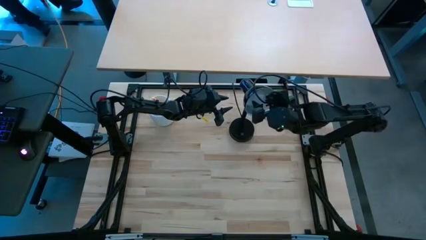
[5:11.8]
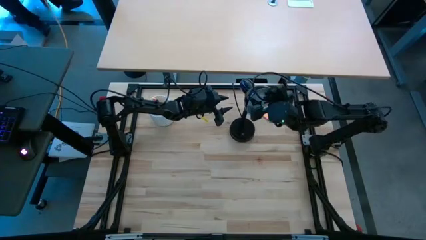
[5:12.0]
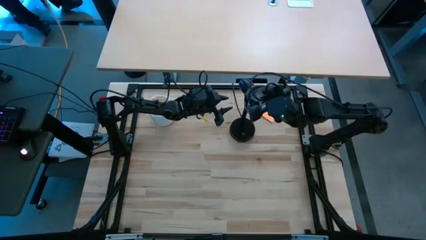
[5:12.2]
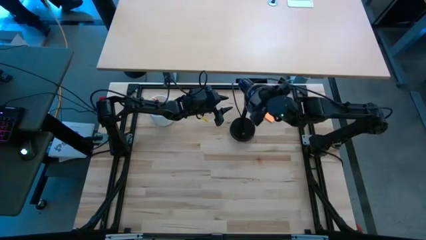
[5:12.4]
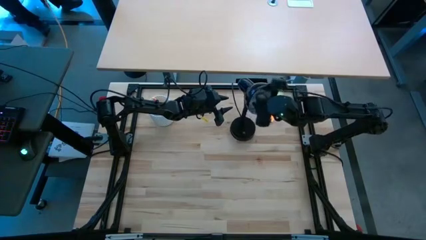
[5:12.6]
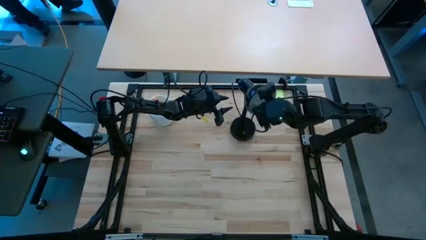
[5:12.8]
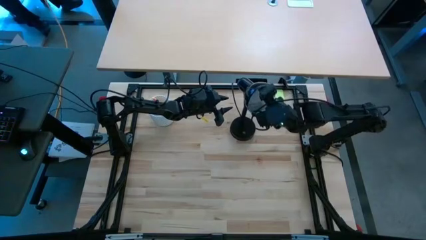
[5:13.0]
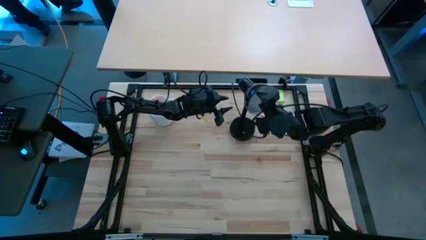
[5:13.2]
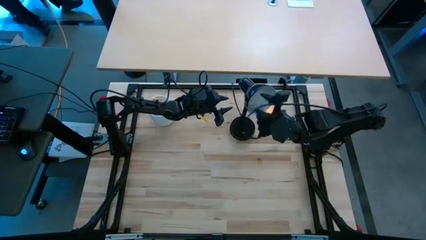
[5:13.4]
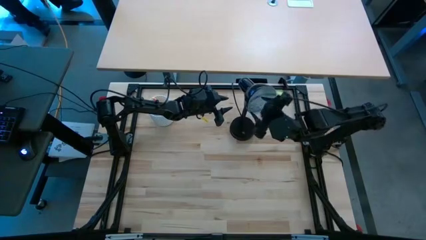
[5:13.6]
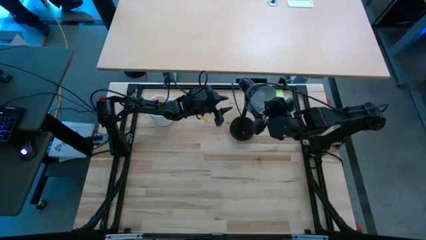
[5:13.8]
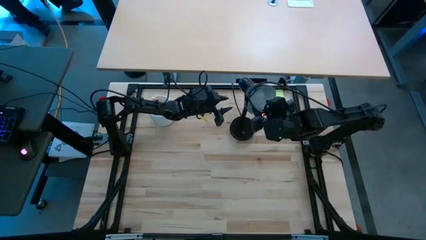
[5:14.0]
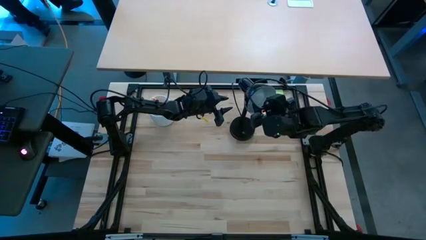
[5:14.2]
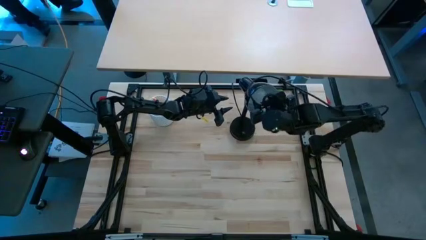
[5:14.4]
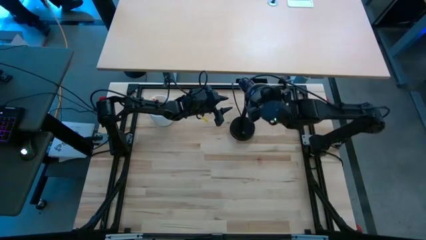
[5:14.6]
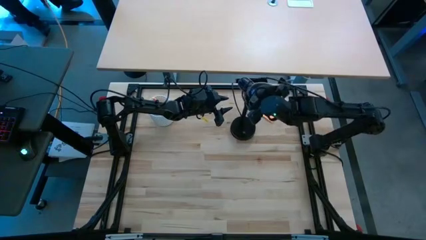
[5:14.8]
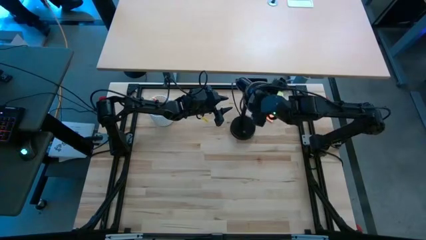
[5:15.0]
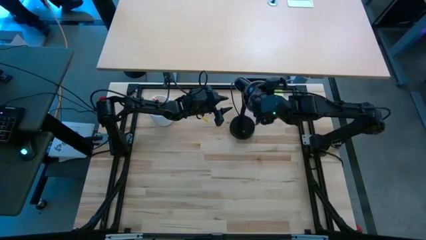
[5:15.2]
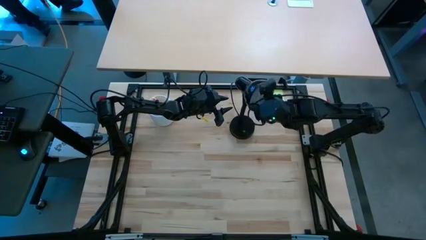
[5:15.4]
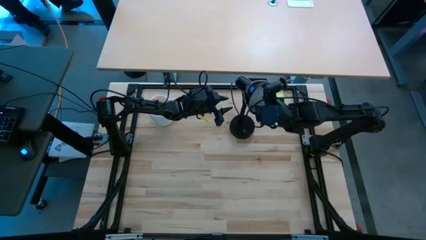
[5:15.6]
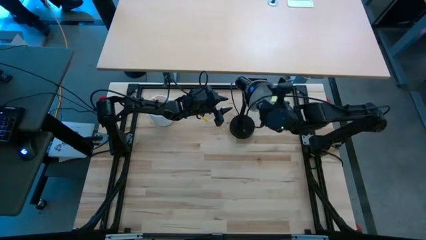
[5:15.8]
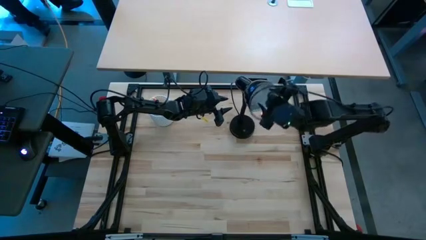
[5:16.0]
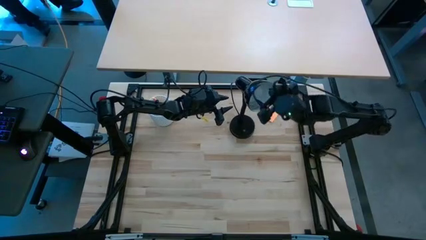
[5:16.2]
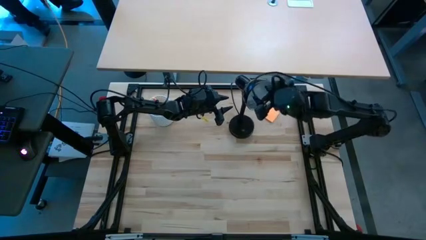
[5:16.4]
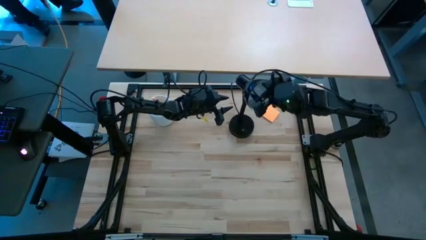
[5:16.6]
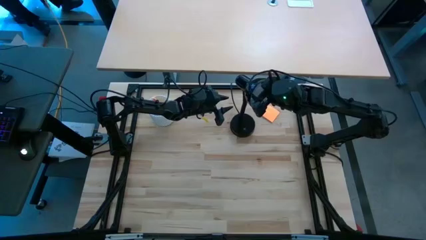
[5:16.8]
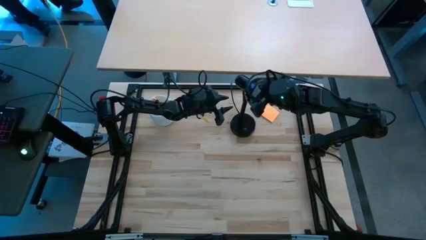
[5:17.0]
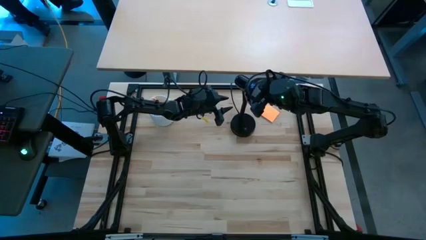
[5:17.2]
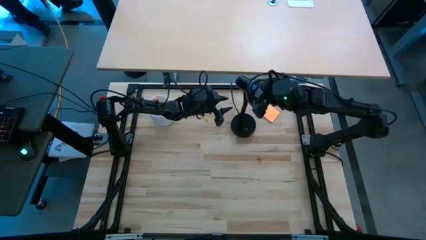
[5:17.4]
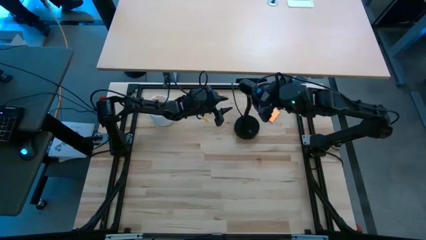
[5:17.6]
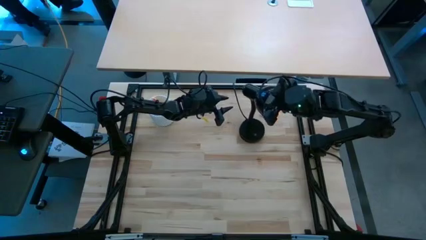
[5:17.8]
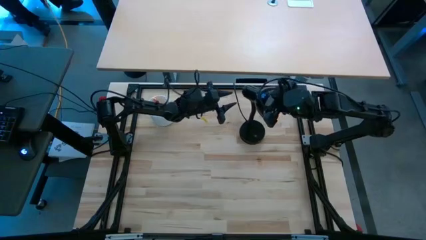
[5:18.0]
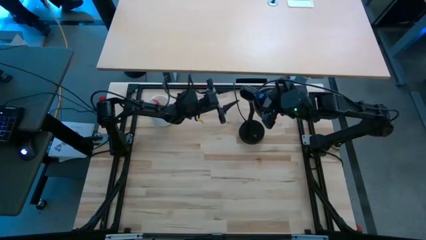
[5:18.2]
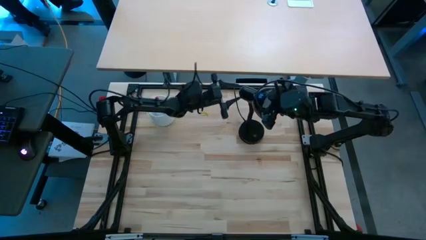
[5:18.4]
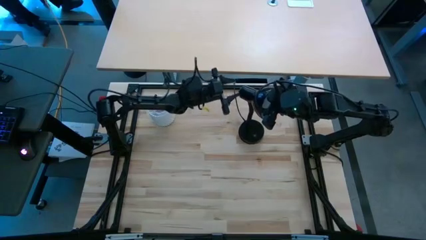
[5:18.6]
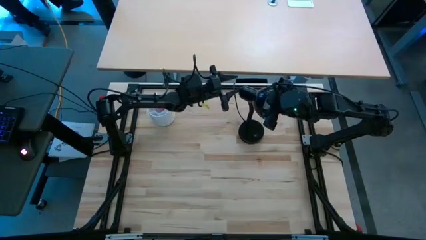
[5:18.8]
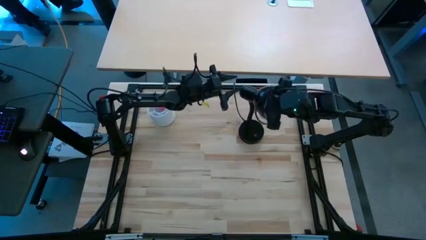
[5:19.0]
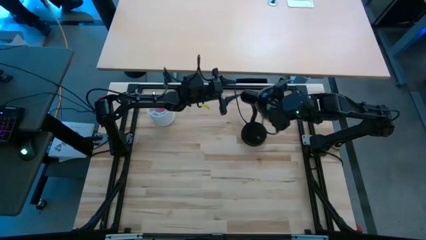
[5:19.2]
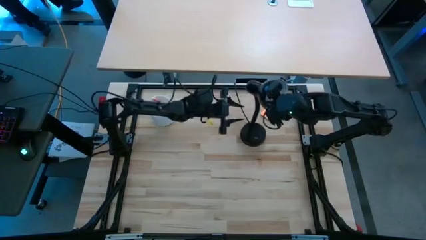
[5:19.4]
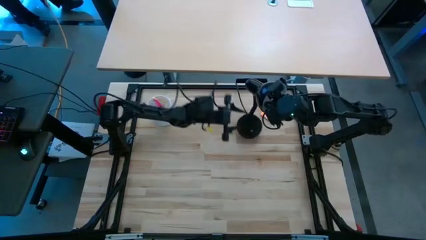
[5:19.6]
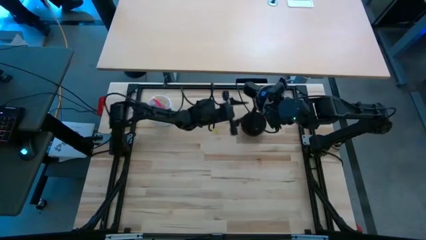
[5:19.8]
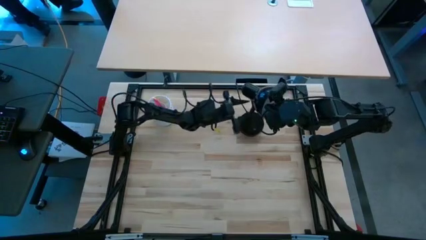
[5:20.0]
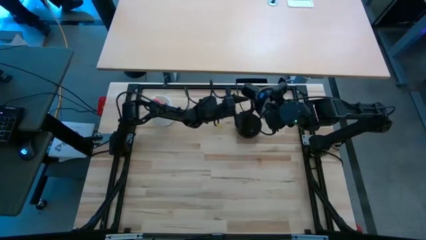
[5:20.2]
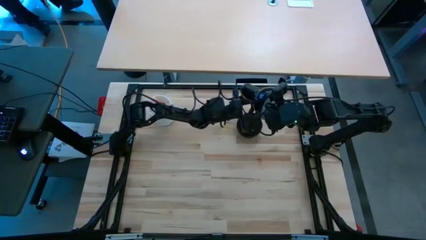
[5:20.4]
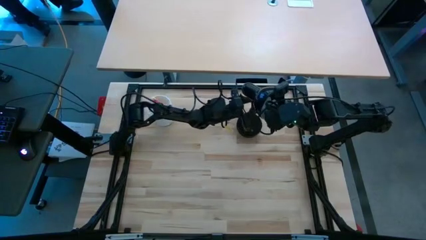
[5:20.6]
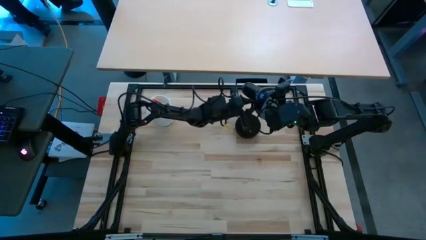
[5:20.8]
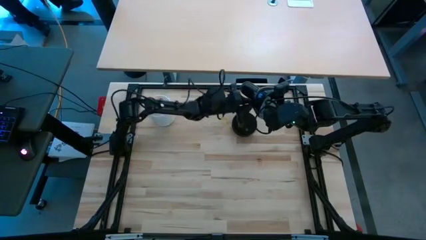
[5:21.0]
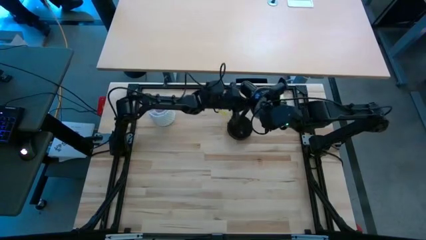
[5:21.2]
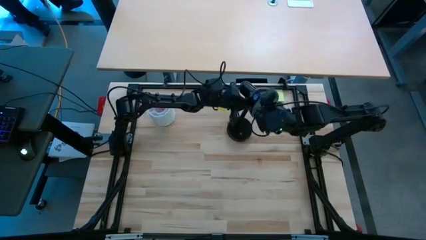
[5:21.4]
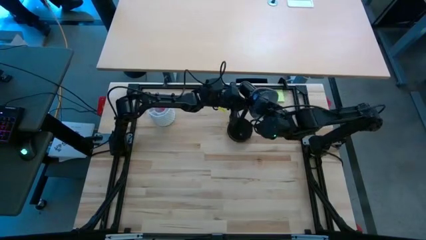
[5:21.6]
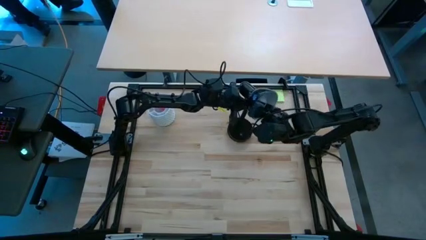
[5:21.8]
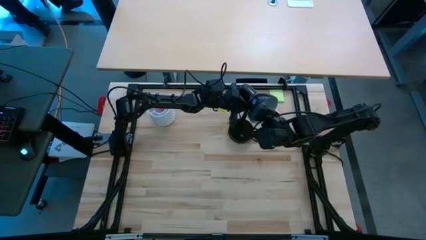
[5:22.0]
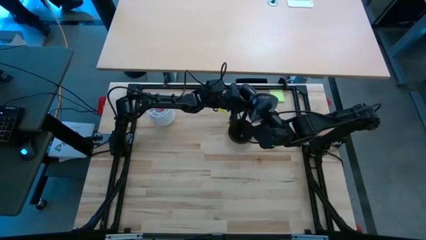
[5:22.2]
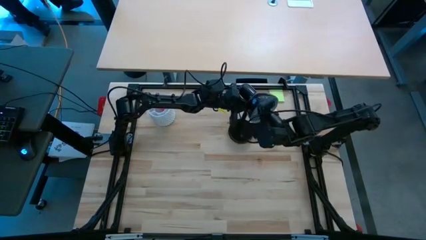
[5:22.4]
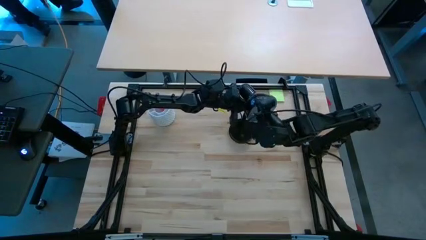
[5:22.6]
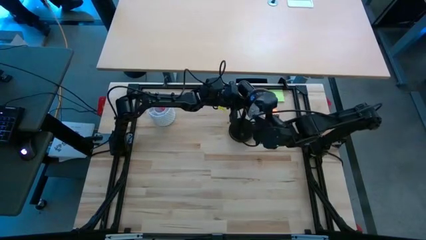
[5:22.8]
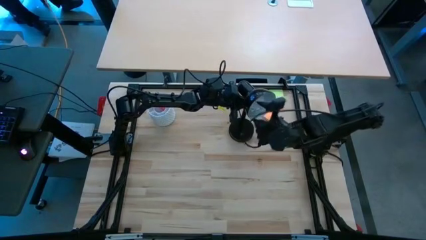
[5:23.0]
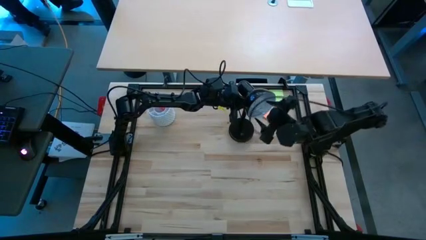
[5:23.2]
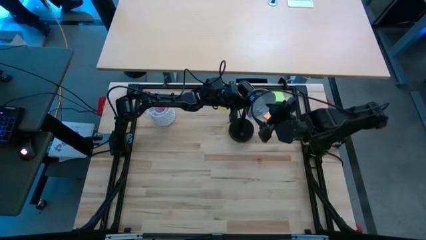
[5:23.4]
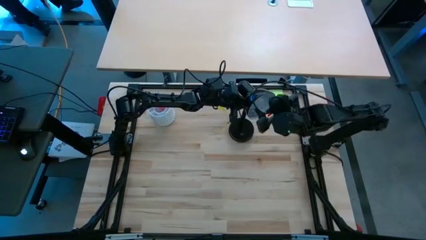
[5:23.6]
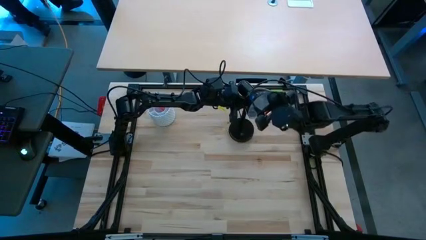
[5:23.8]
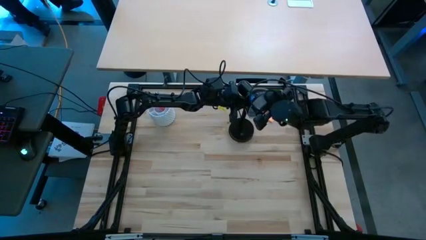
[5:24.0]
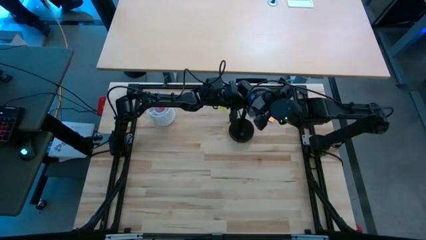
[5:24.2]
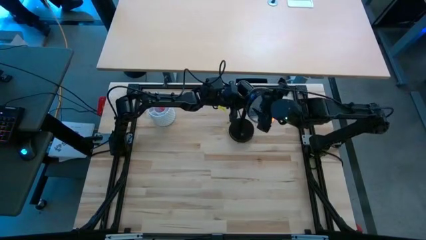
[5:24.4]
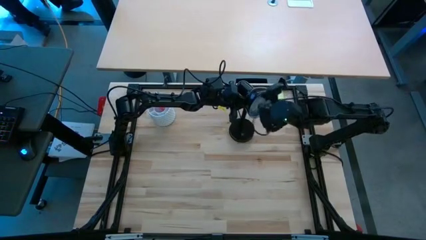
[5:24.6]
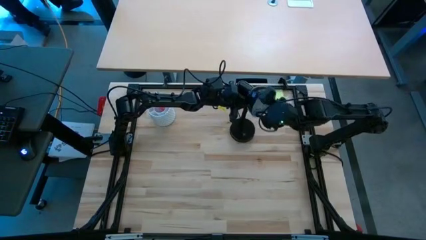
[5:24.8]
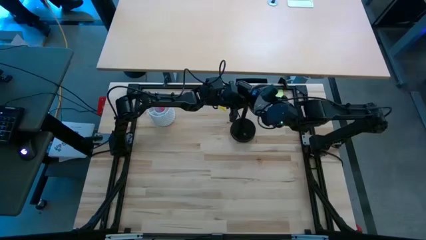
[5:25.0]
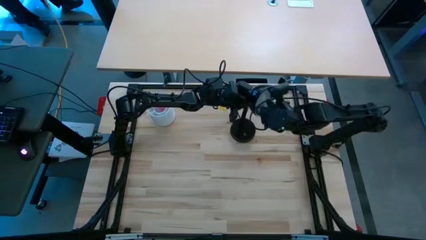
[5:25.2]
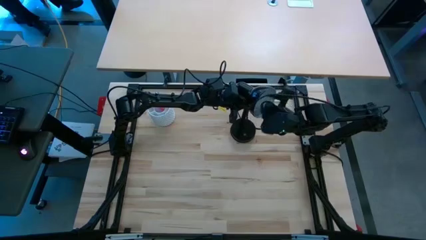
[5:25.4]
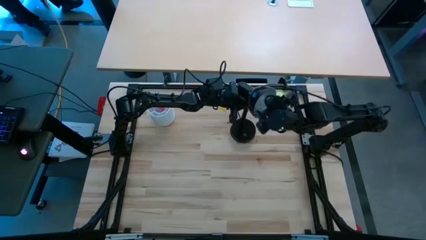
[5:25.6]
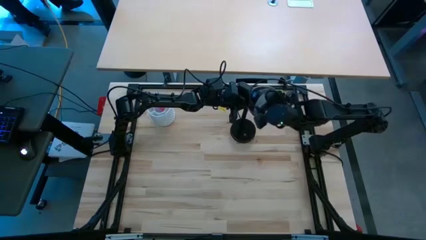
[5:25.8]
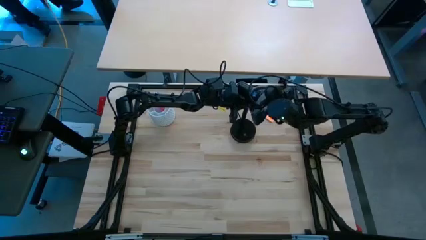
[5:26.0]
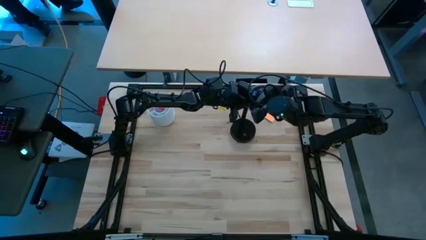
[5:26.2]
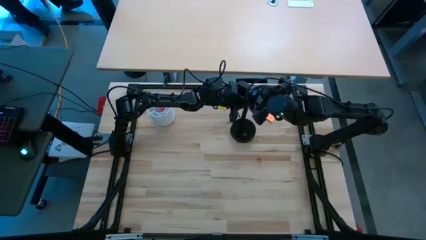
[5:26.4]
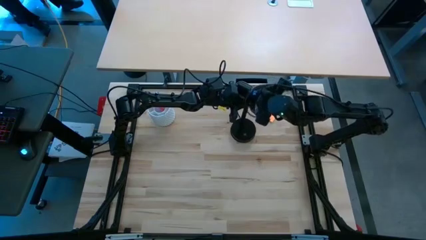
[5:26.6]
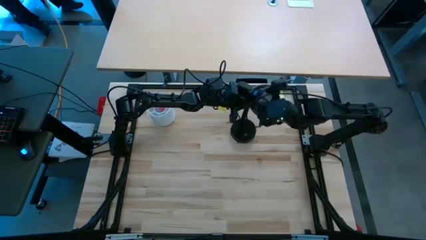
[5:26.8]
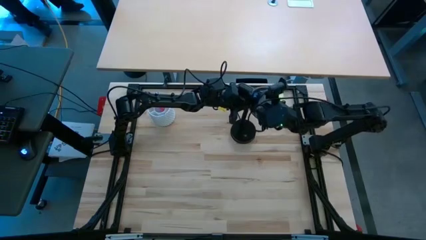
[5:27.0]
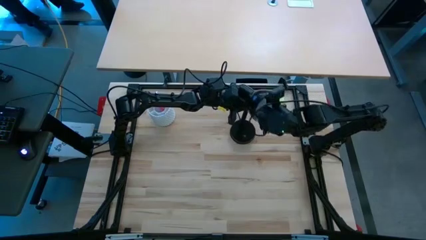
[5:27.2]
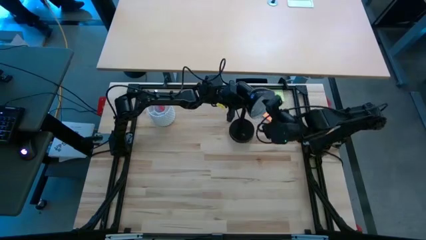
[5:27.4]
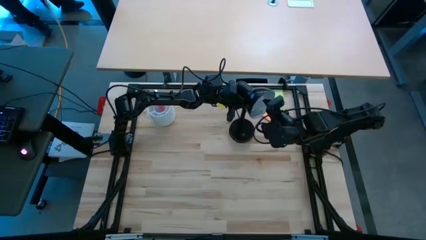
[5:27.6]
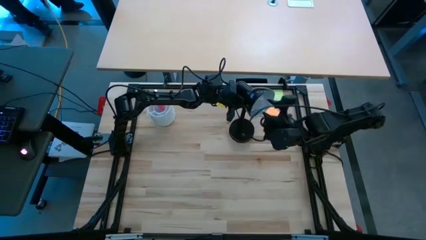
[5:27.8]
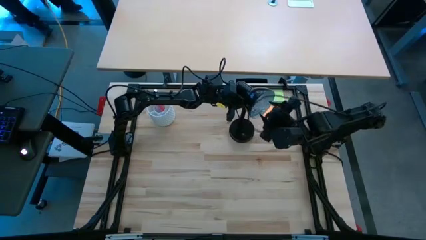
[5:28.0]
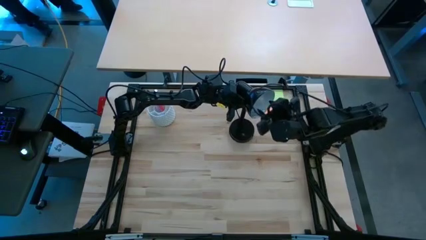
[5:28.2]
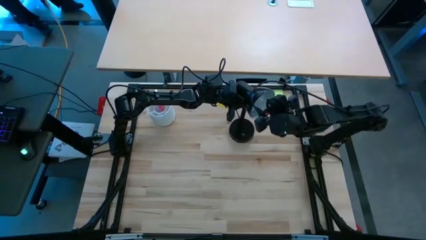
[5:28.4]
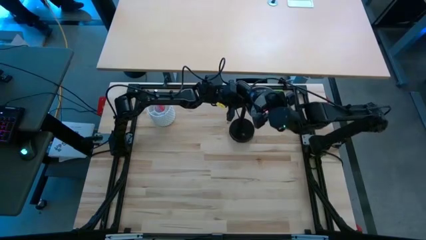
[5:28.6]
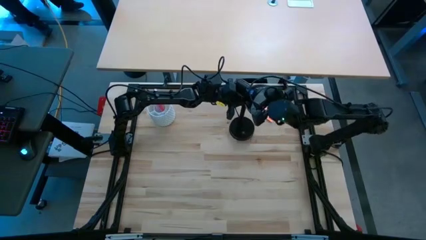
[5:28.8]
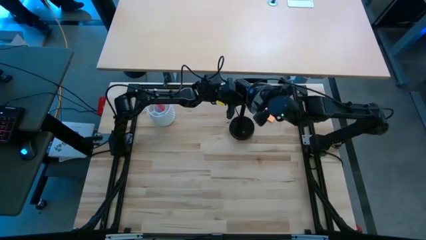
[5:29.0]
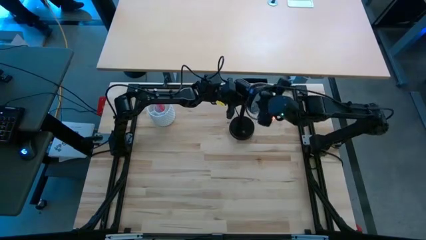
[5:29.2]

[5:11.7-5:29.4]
Task: Screw lightbulb
Remove the light bulb from the desk lamp
